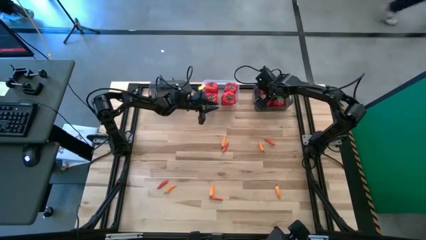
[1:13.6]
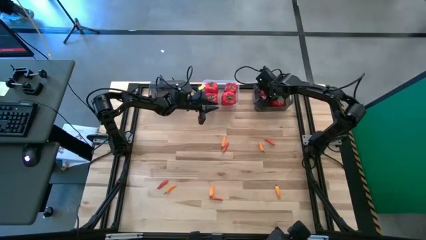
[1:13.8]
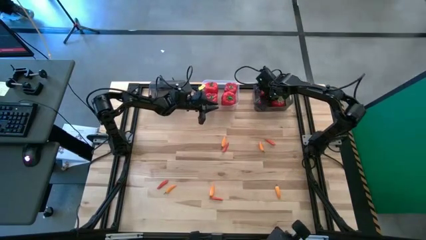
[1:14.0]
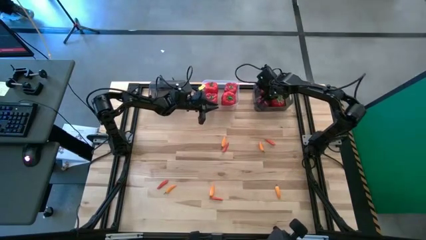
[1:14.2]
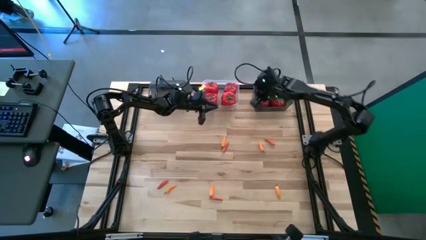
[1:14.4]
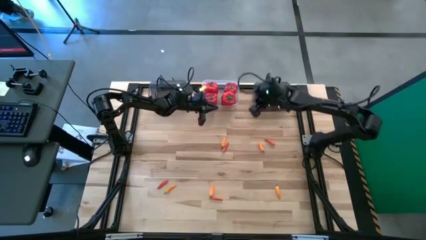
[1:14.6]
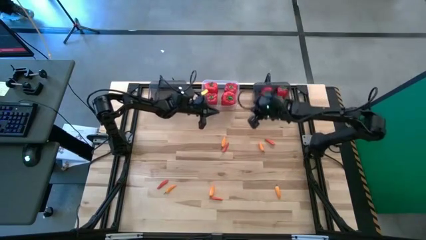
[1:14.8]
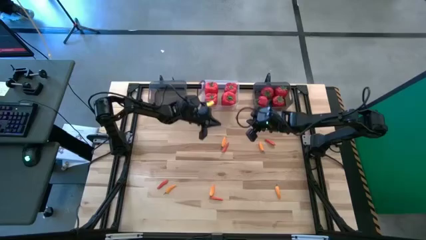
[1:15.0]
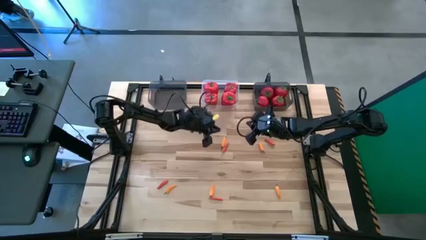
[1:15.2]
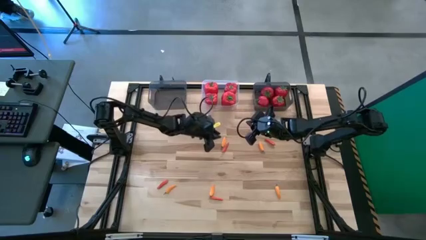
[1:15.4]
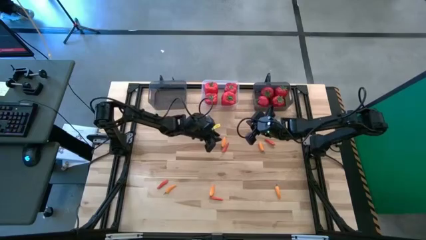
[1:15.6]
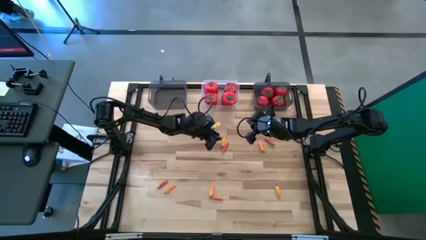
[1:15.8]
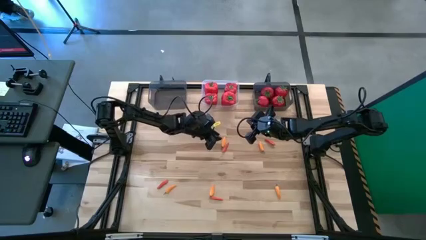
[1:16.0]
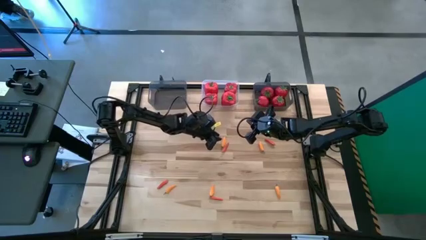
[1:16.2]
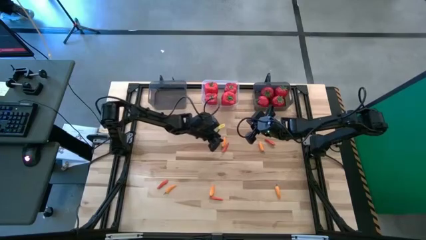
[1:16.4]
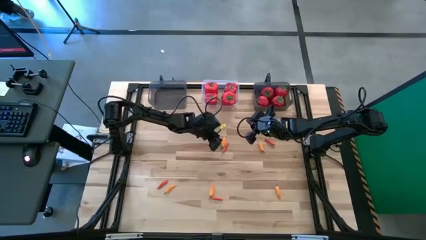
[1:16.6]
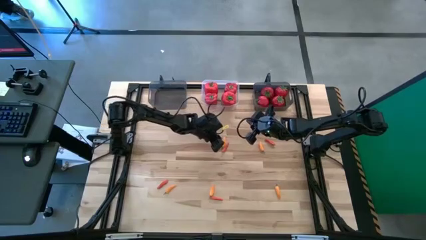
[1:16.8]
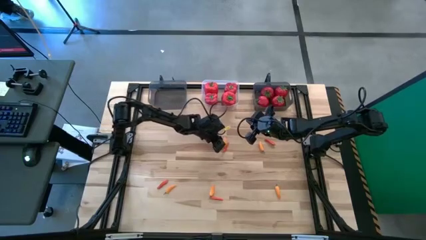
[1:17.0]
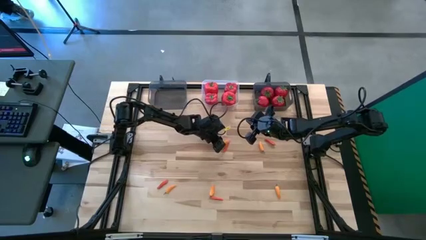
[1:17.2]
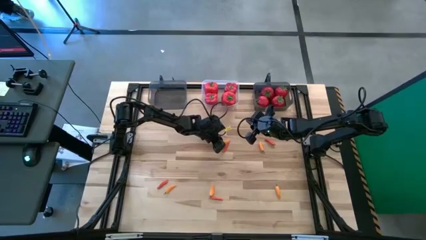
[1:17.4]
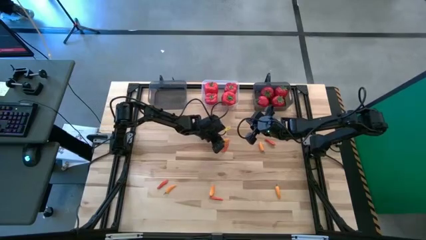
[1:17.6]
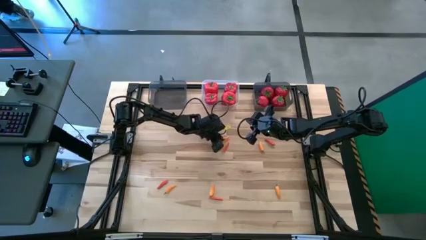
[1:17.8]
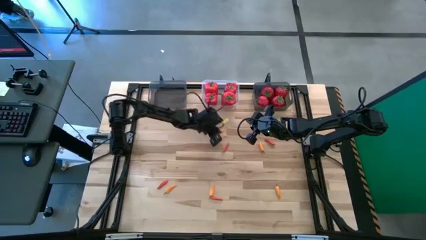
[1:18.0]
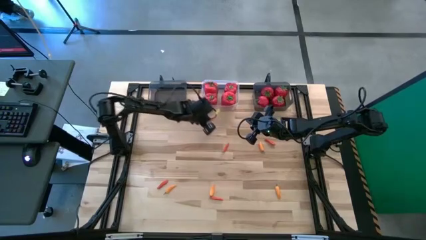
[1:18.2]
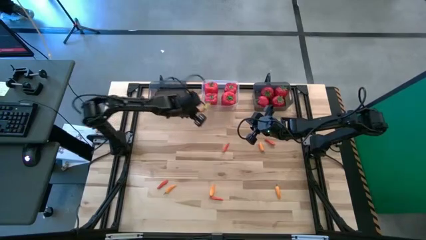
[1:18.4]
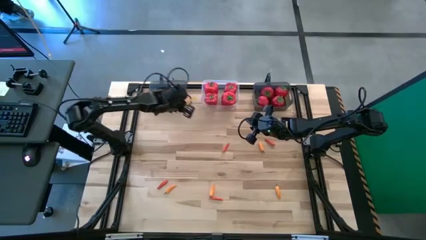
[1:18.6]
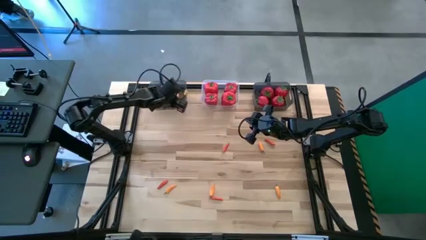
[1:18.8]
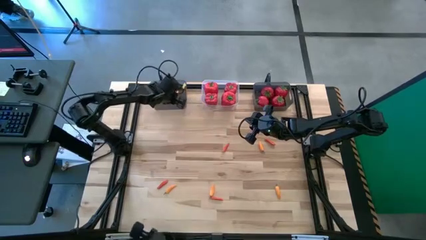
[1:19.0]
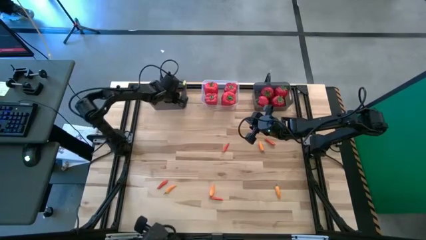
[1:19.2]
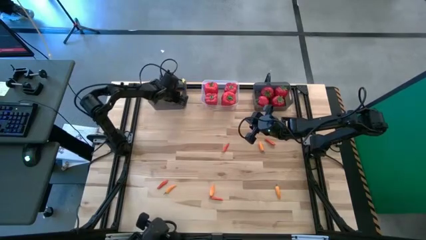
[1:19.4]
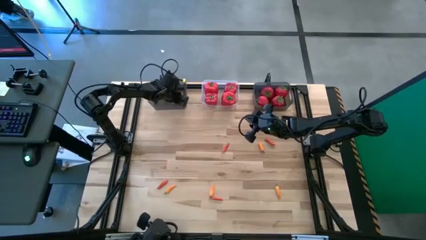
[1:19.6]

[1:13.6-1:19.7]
Task: Sort produce into baskets
Put the yellow chili pepper into the left black bin

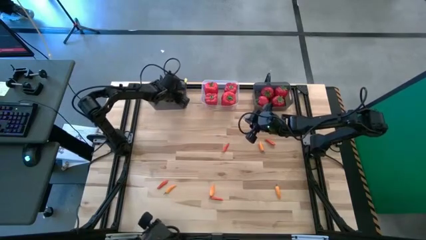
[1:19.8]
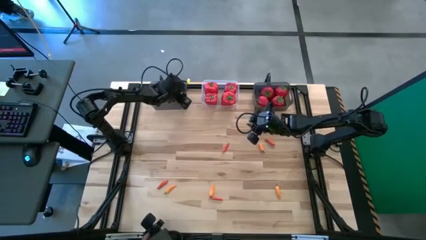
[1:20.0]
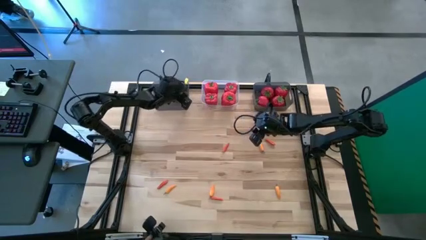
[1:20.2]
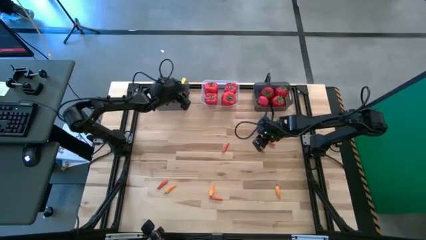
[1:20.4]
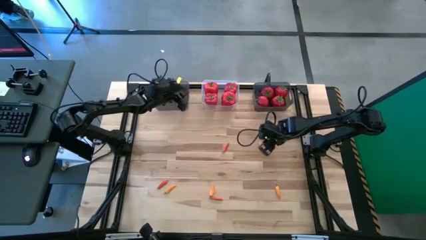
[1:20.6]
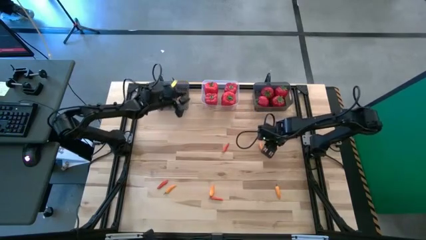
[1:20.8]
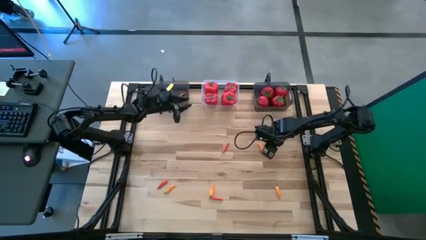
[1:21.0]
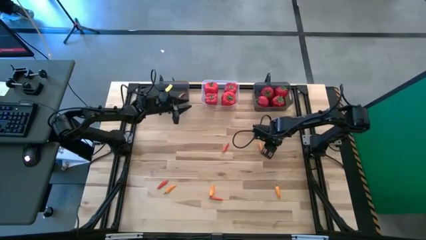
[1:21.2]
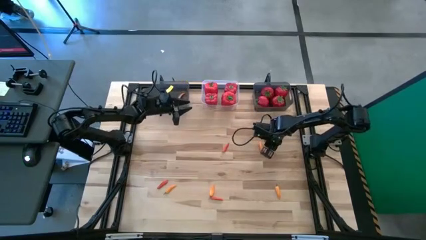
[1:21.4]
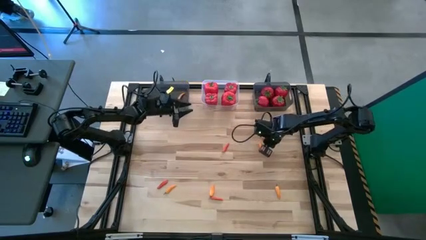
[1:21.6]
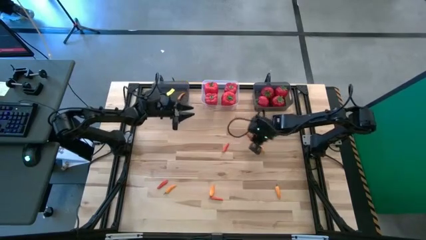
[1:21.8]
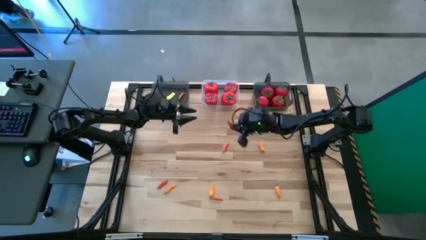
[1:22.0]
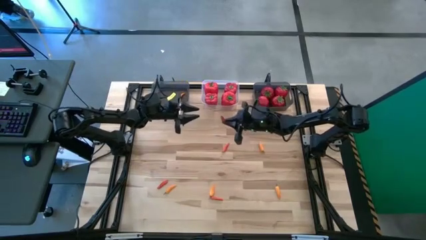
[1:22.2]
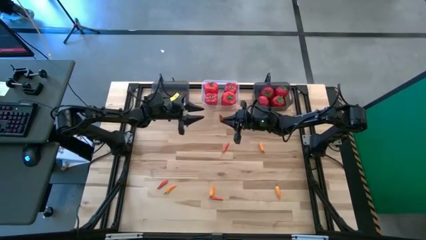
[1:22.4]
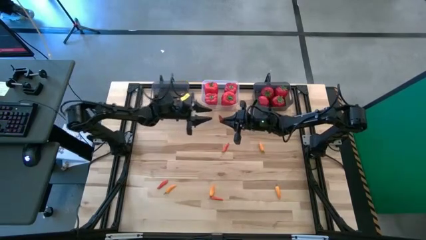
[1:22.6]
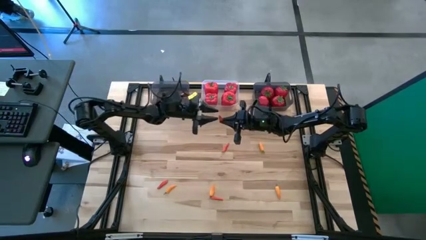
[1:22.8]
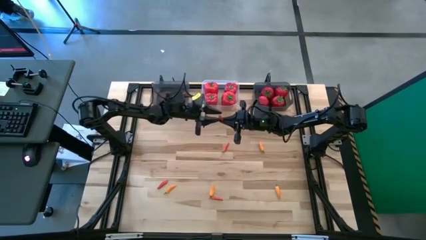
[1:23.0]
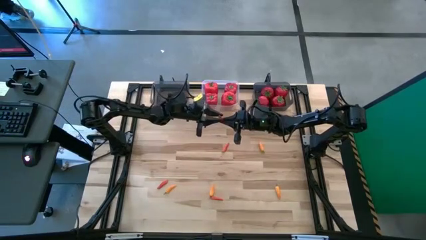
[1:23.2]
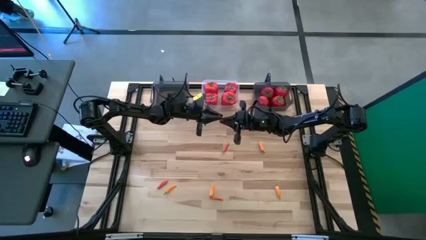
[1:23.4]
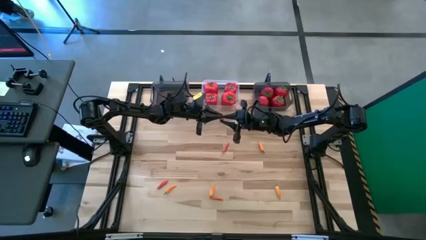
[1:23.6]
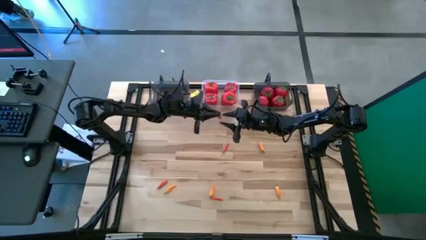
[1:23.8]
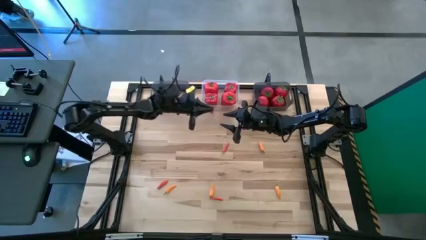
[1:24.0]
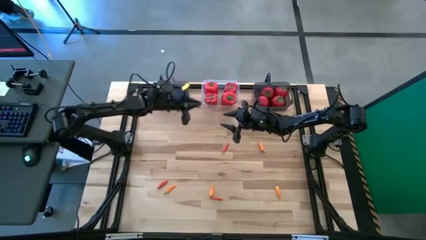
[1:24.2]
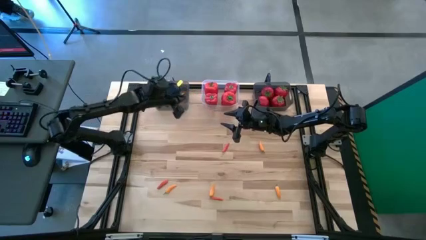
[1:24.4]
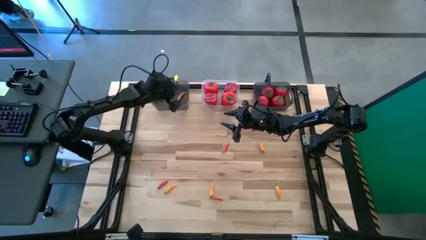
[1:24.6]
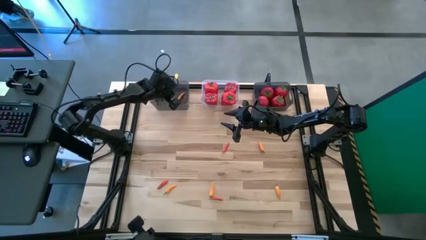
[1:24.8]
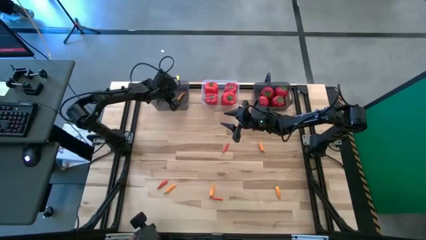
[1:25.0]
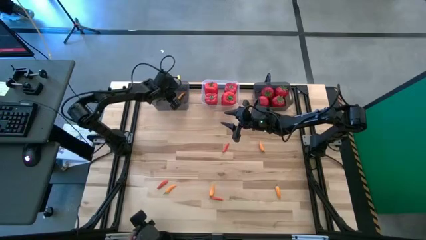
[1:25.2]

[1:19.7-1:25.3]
Put the orange chili pepper into the left black bin

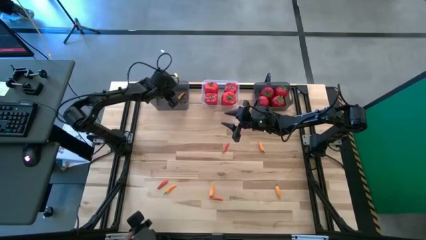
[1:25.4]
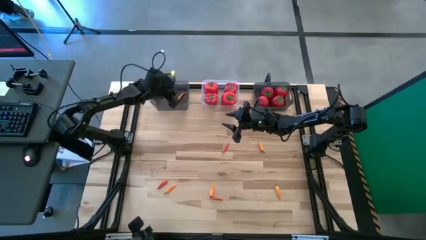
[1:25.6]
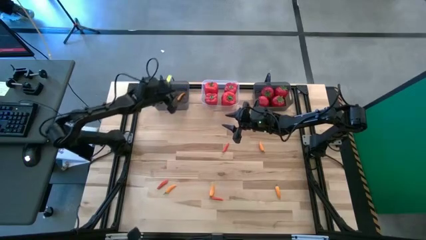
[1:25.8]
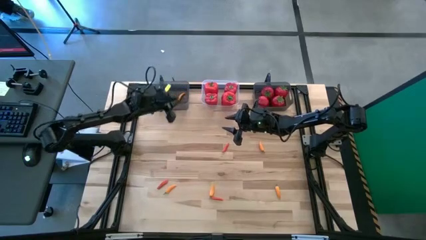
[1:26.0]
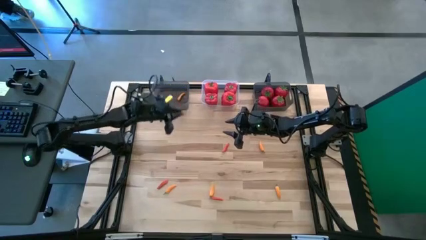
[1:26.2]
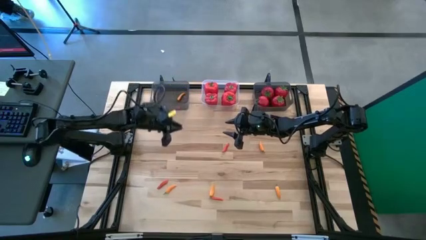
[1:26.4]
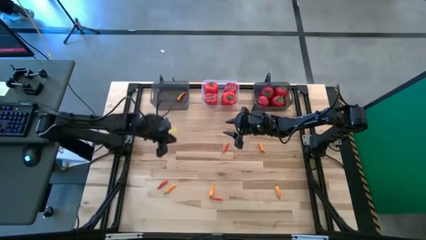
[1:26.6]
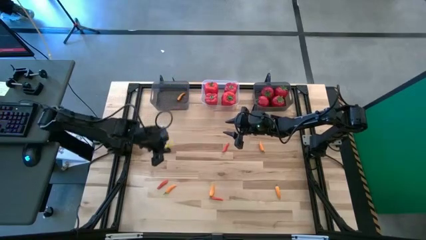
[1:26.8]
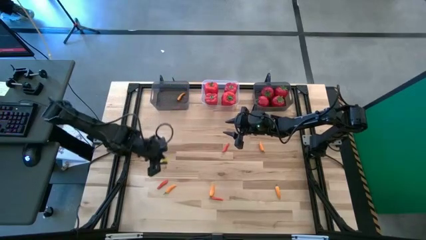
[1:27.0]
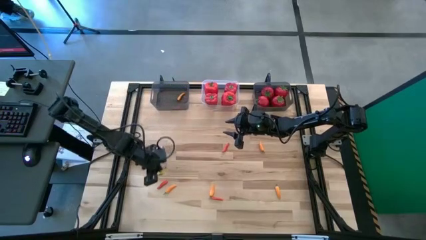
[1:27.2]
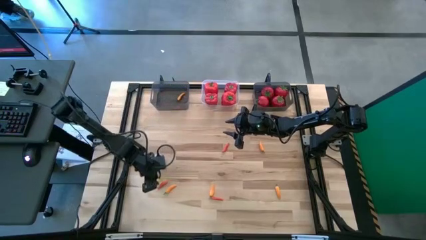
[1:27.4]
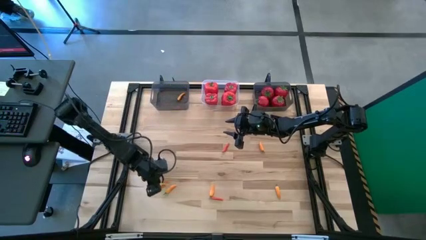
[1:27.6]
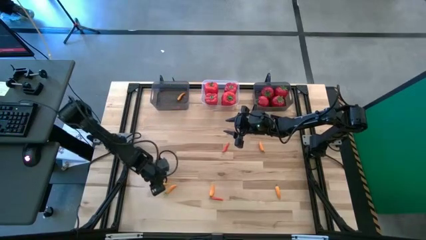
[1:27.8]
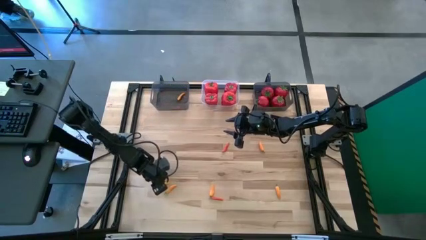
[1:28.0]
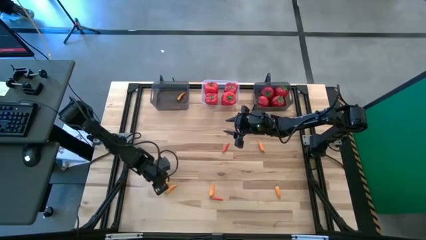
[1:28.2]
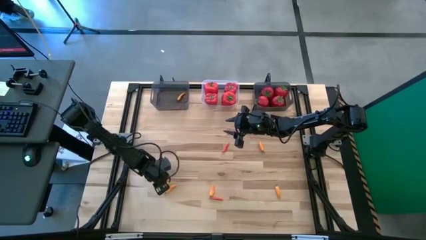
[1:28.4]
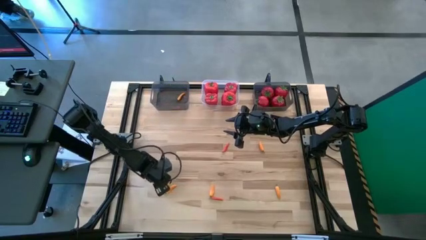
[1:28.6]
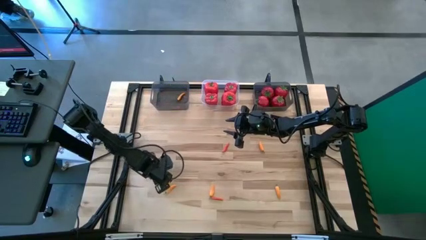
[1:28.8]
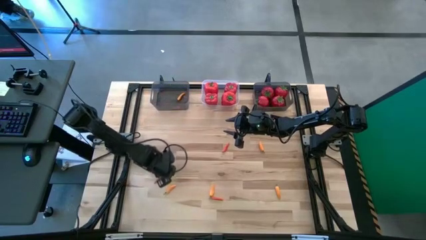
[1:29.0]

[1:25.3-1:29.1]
Put the orange chili pepper into the left black bin

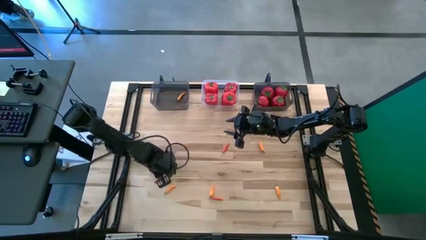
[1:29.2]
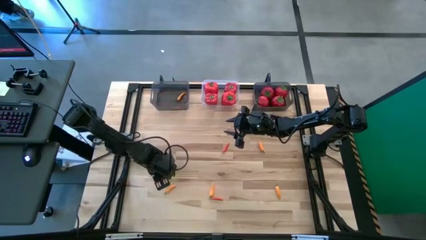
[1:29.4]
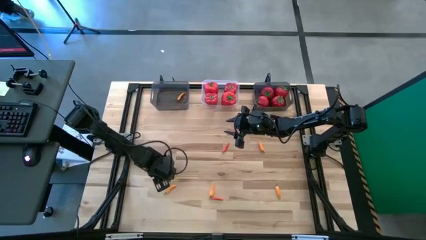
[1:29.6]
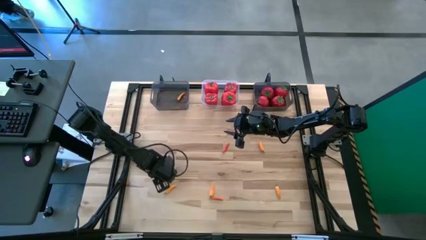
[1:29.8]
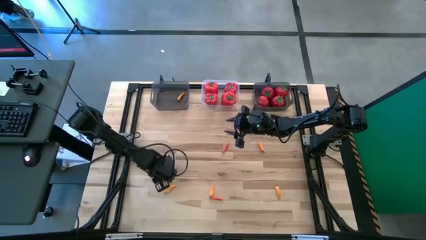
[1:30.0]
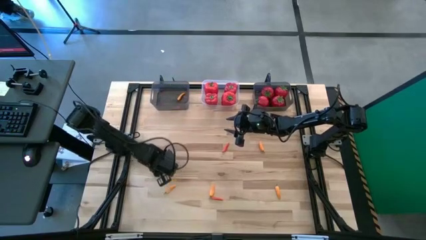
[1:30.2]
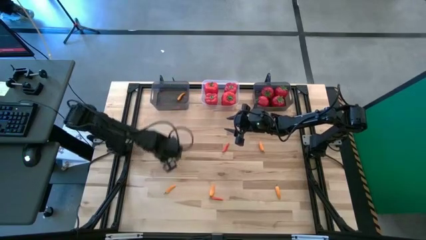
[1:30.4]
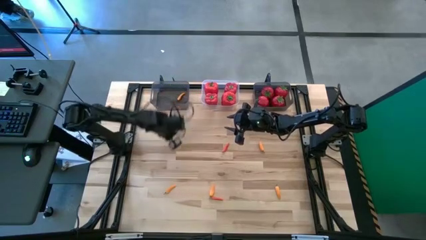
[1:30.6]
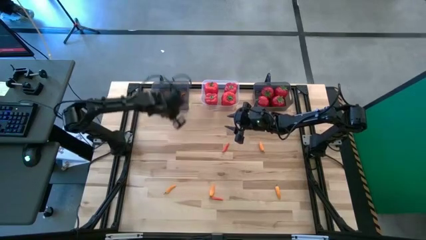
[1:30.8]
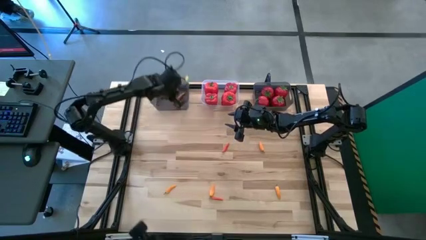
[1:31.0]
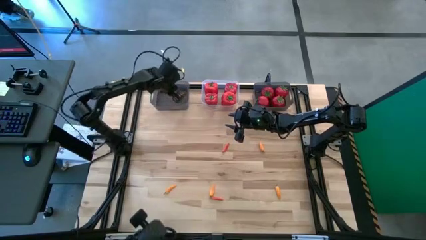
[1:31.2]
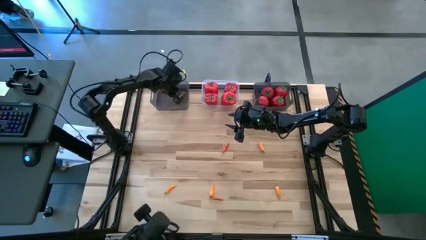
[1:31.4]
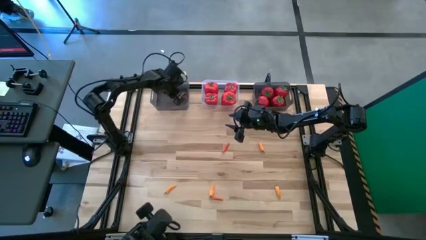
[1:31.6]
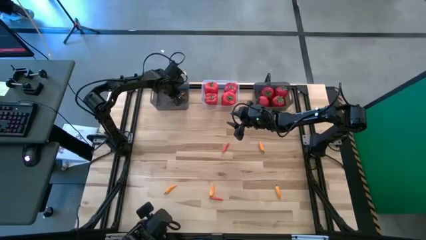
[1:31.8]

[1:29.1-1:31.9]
Put the orange chili pepper into the left black bin
